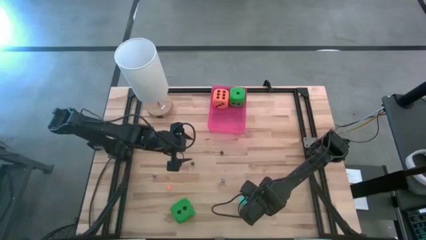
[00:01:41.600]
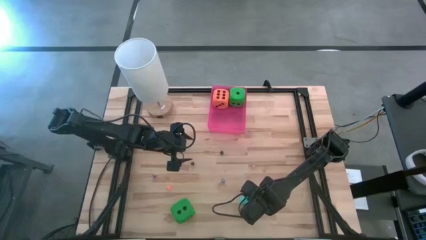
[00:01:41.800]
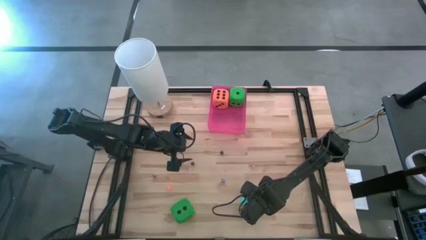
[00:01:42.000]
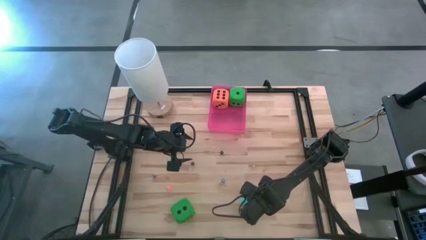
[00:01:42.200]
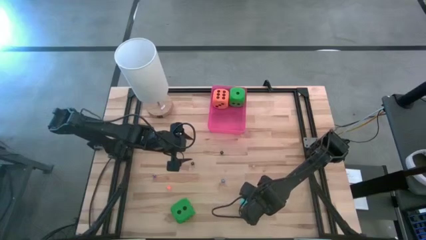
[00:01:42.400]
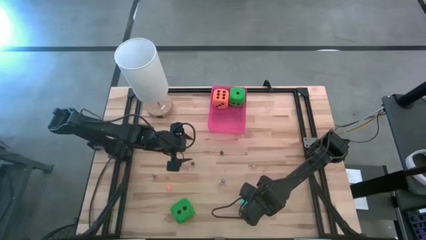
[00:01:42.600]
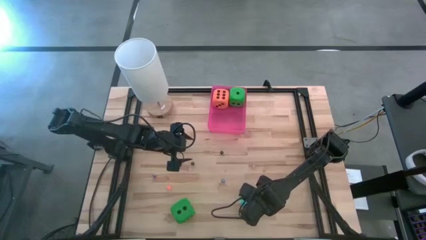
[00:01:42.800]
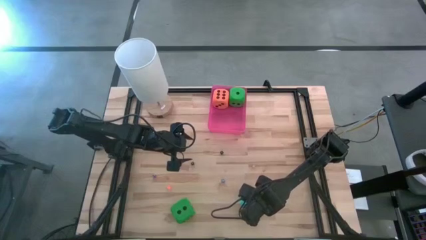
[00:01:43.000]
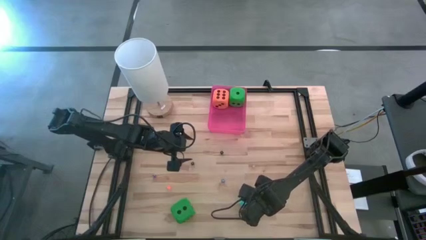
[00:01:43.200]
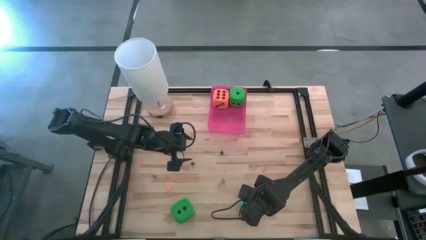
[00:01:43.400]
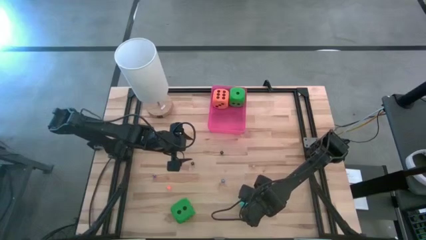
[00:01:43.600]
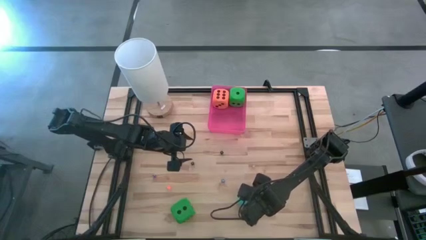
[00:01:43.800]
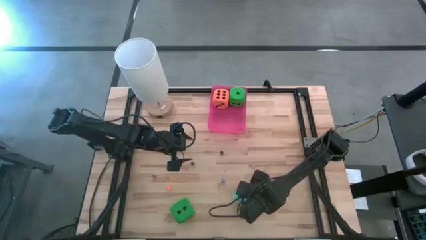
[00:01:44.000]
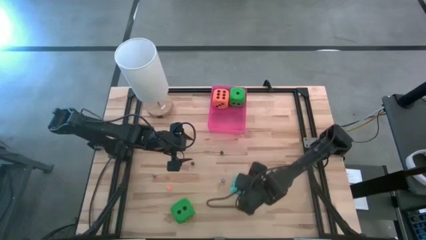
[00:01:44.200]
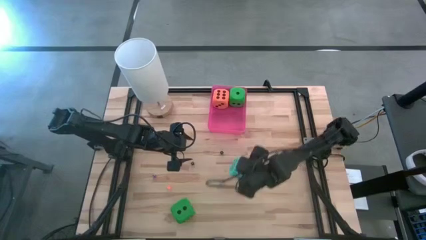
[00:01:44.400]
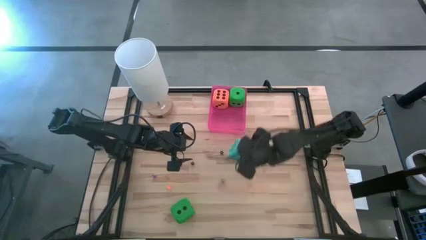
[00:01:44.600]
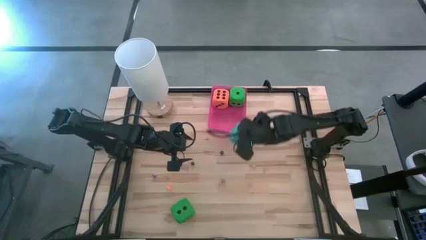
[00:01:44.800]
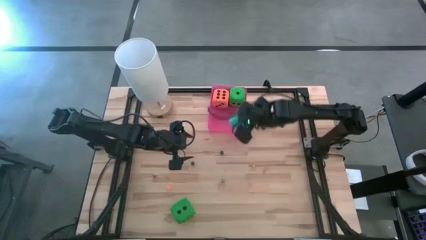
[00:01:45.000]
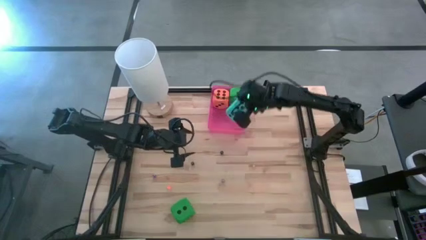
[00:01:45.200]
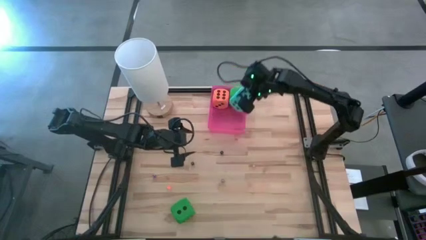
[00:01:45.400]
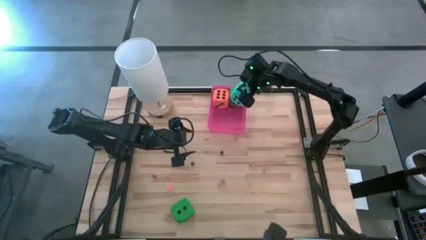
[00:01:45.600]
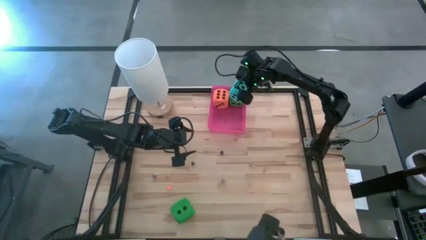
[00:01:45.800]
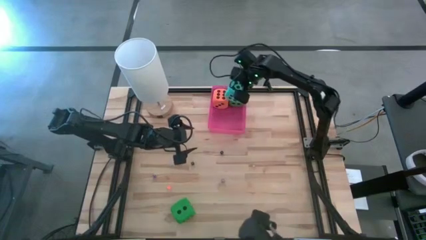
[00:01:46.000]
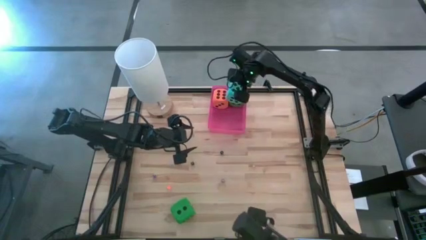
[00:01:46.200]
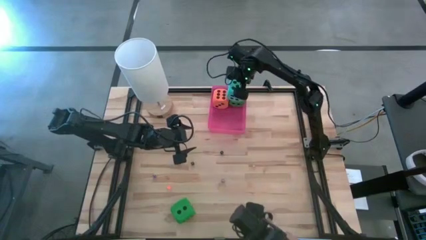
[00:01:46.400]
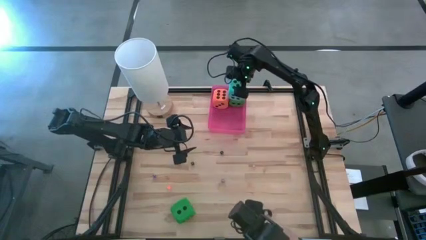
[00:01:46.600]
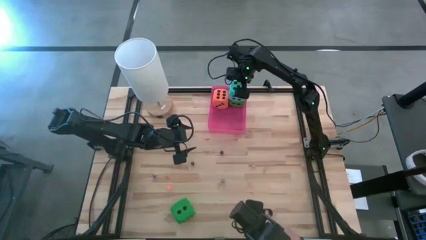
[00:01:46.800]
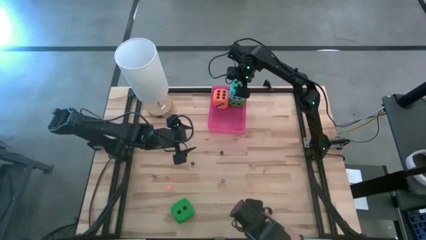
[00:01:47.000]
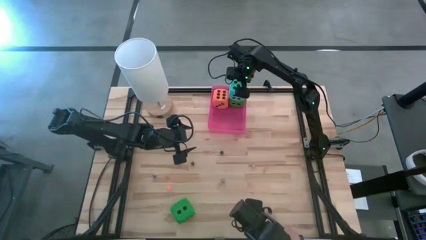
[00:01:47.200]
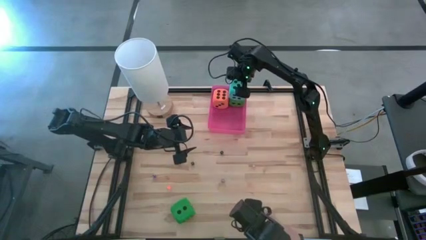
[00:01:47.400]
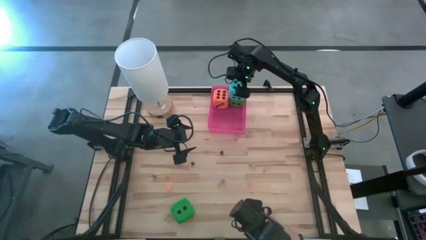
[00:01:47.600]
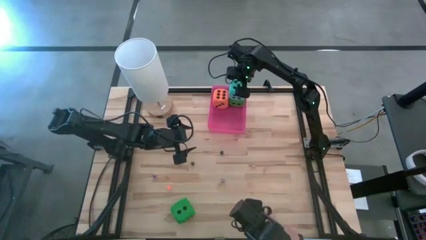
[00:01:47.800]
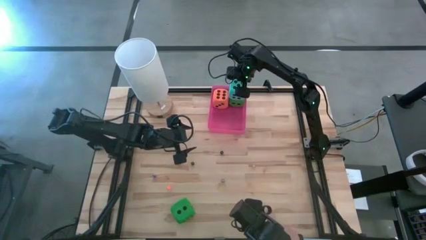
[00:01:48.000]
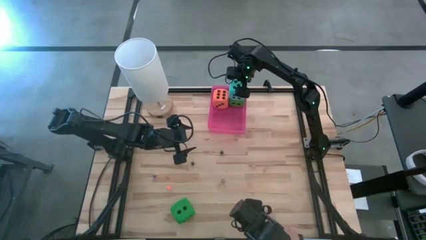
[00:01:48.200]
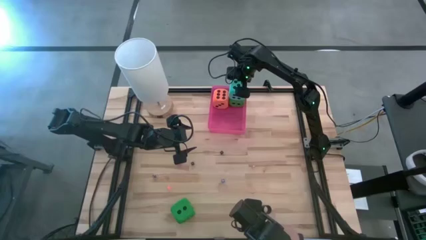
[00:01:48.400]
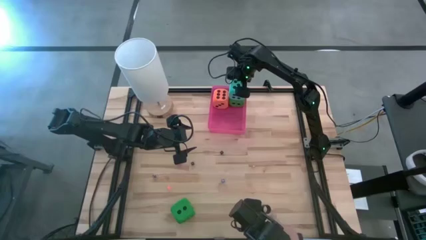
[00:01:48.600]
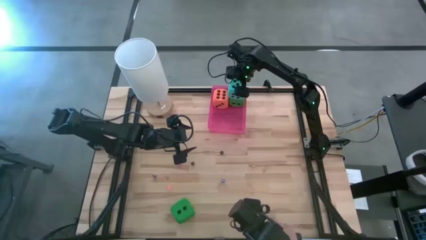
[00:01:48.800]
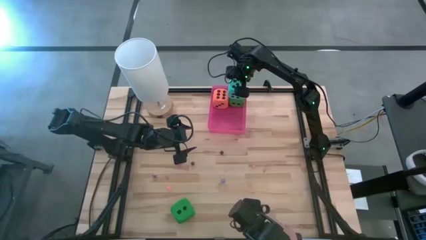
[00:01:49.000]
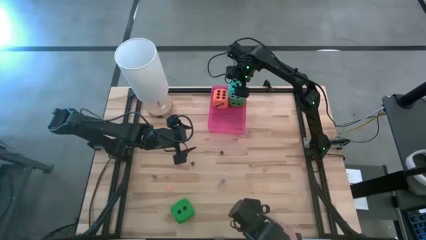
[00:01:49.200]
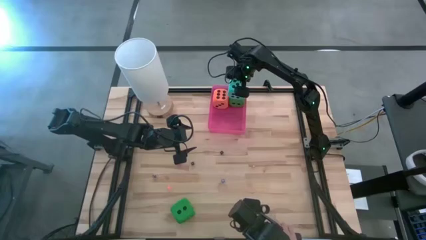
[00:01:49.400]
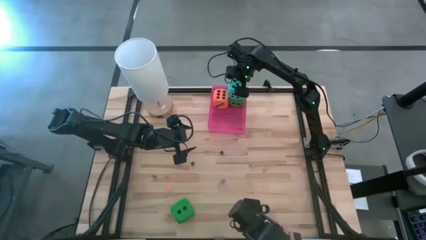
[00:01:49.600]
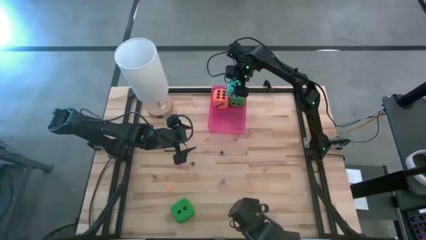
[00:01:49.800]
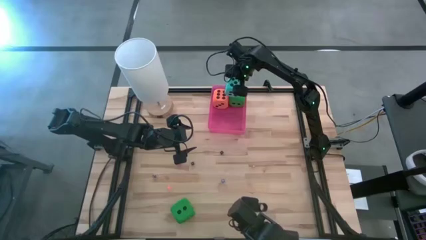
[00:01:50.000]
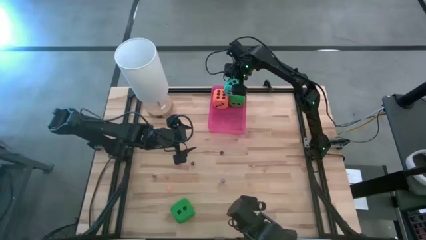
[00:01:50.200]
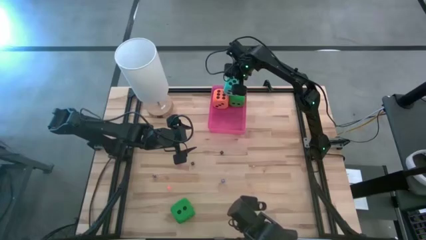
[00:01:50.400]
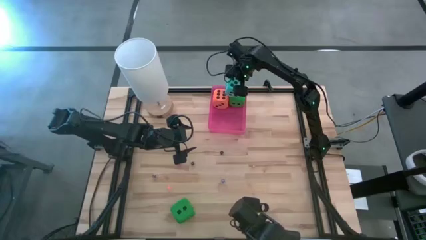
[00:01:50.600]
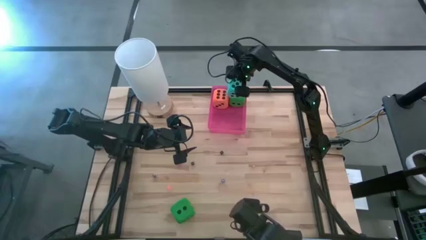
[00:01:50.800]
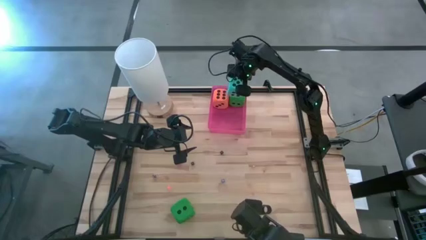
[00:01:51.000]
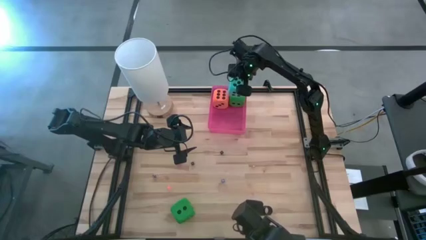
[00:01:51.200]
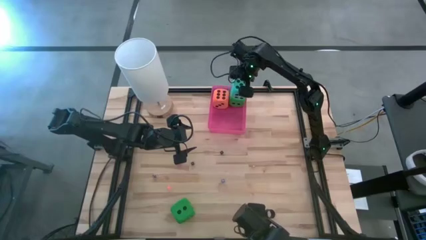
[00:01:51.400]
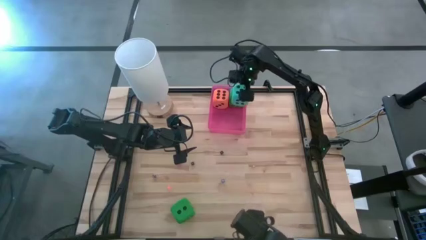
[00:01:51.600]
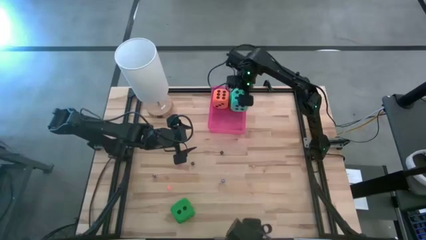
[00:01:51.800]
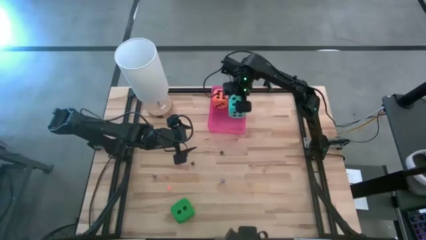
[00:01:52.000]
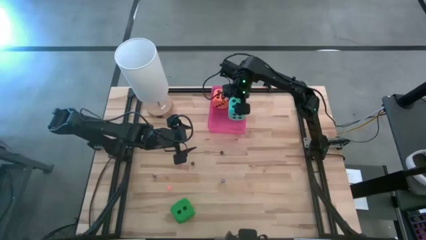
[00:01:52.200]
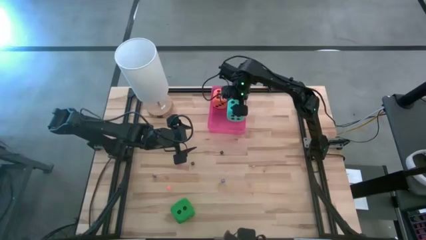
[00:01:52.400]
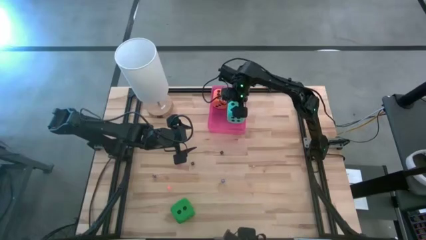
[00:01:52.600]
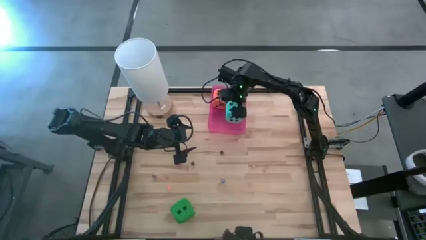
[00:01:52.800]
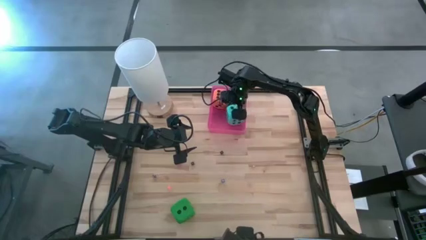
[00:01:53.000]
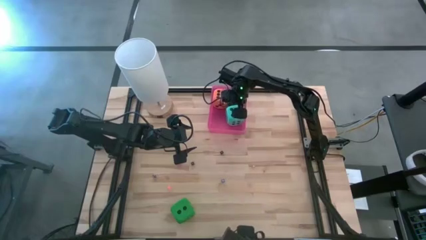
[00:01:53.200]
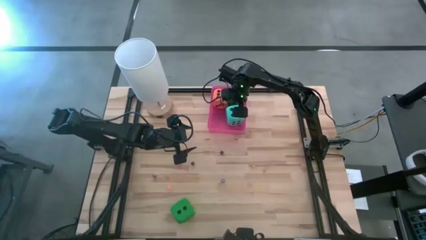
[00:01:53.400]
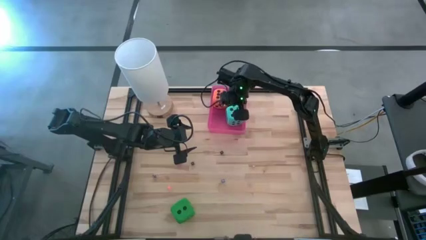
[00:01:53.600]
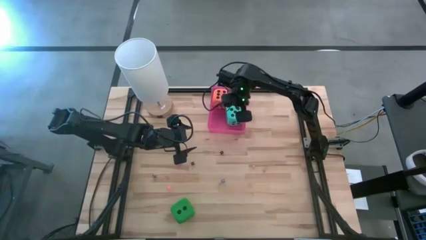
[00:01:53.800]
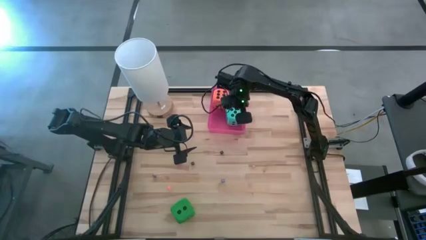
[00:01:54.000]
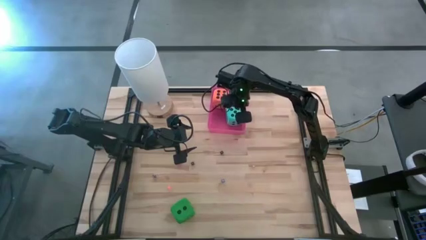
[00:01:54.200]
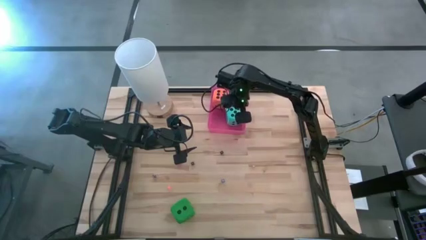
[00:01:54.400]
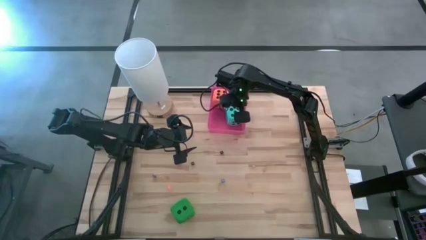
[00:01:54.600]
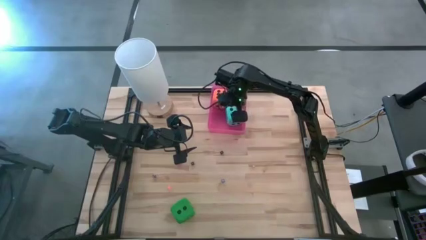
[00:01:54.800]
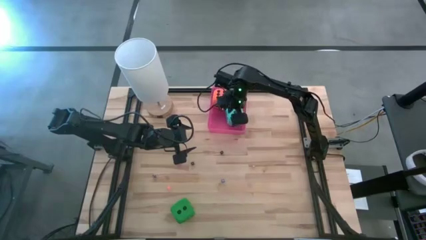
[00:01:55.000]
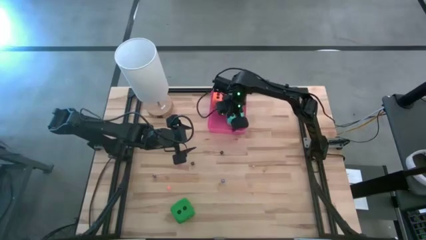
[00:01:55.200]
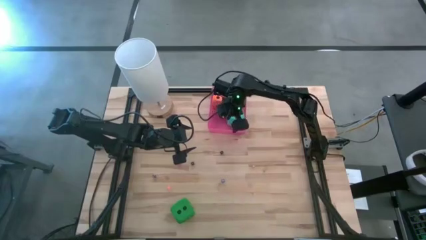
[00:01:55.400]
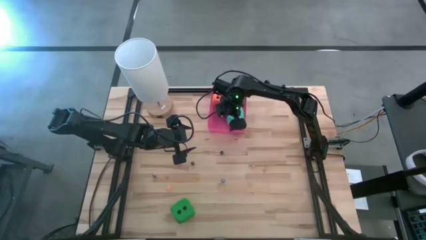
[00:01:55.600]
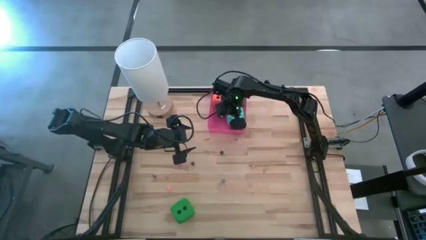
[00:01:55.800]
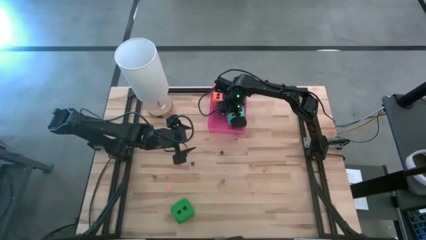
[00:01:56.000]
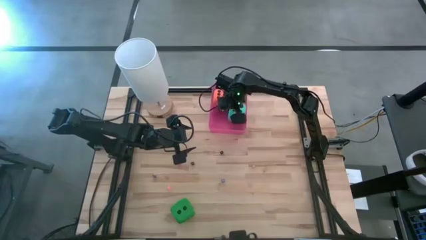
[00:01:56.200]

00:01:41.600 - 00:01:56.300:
Task: Pick & Place Dice
Put the big blue dice into the red container
